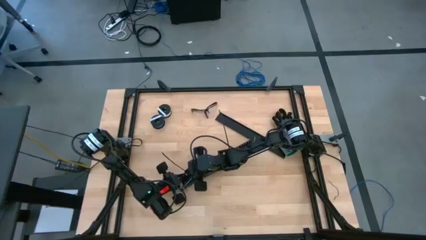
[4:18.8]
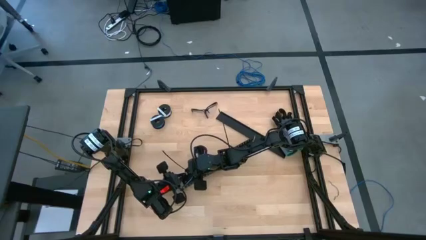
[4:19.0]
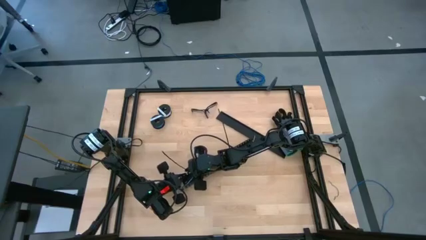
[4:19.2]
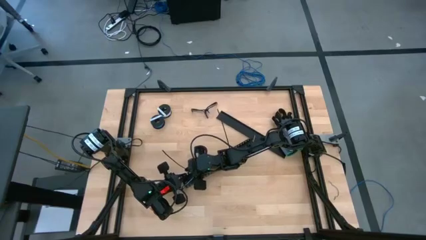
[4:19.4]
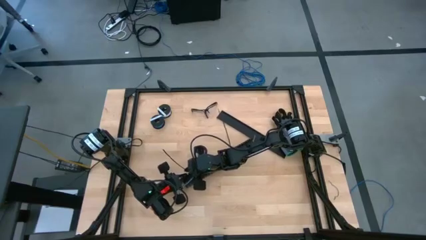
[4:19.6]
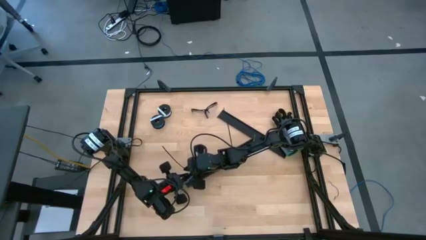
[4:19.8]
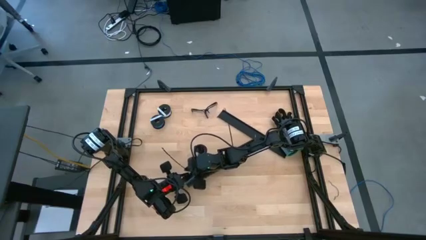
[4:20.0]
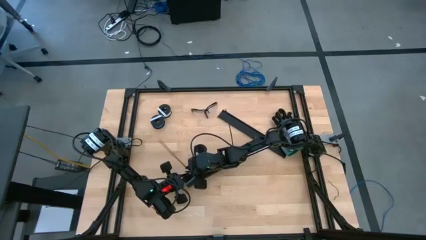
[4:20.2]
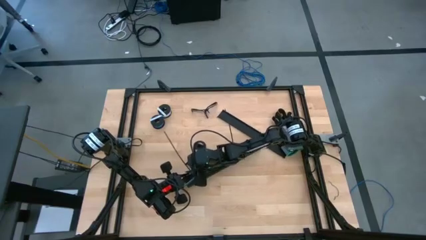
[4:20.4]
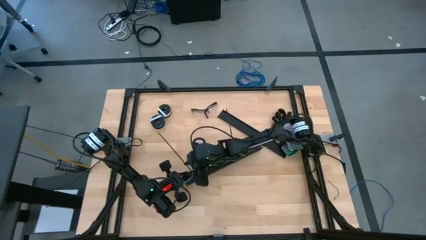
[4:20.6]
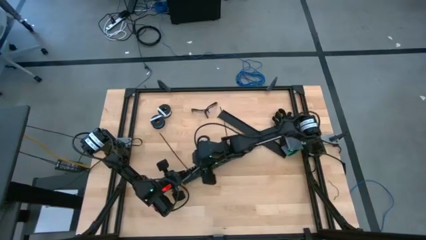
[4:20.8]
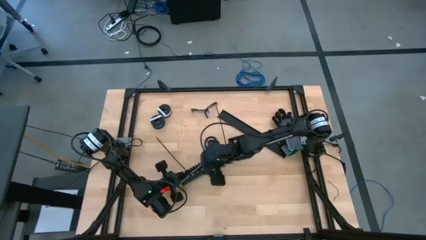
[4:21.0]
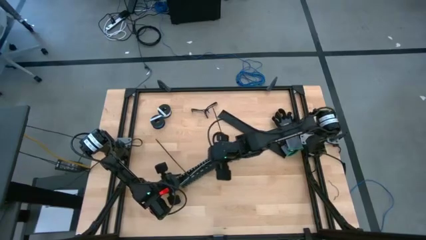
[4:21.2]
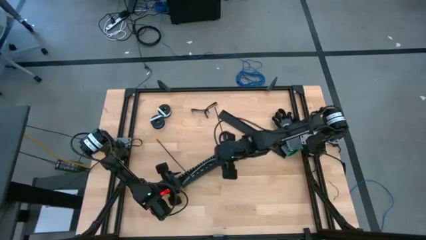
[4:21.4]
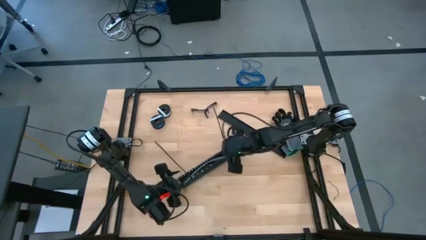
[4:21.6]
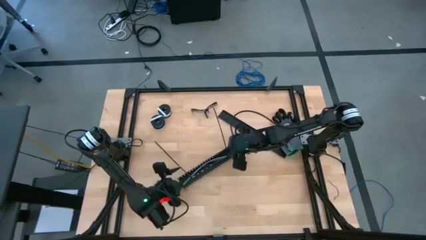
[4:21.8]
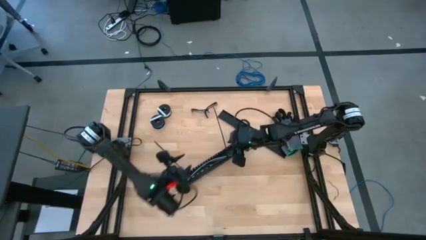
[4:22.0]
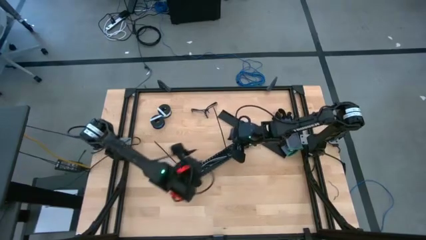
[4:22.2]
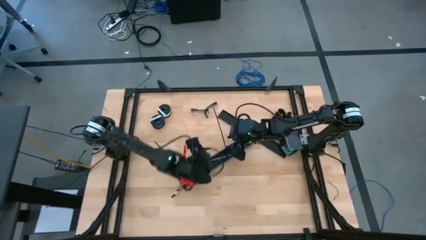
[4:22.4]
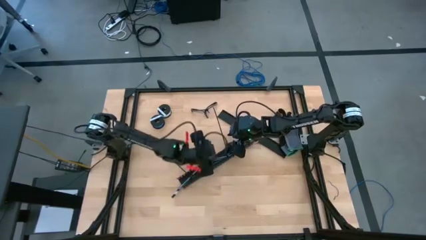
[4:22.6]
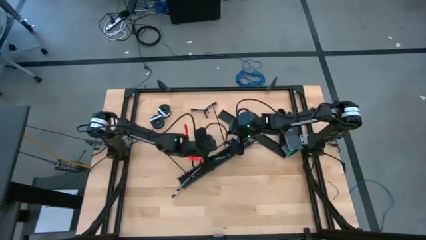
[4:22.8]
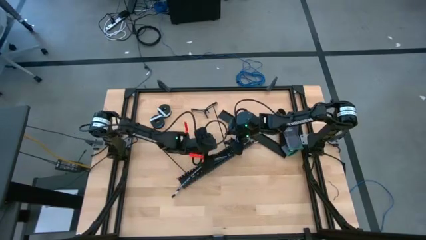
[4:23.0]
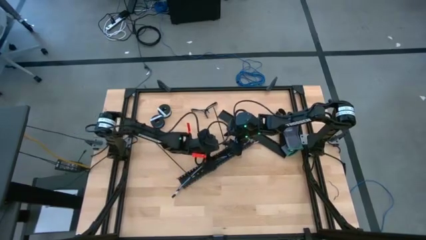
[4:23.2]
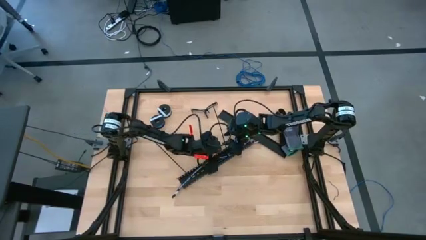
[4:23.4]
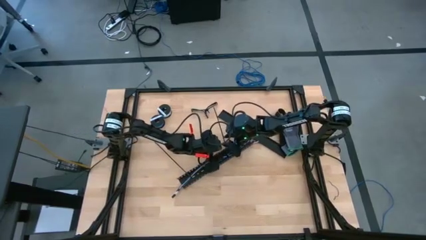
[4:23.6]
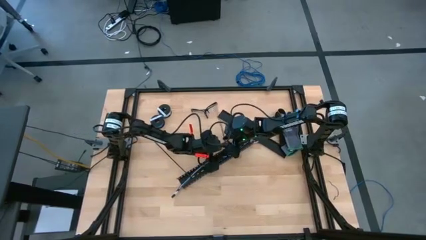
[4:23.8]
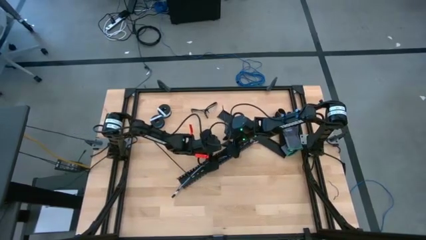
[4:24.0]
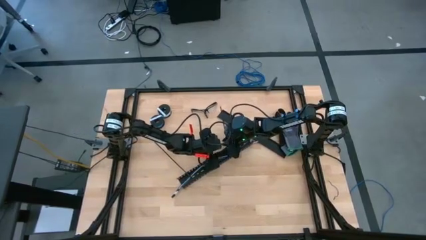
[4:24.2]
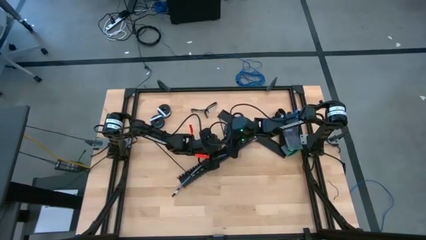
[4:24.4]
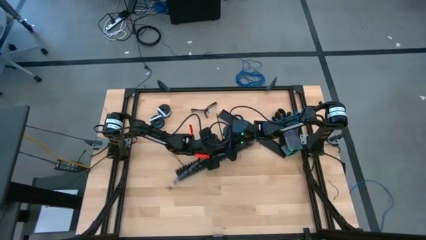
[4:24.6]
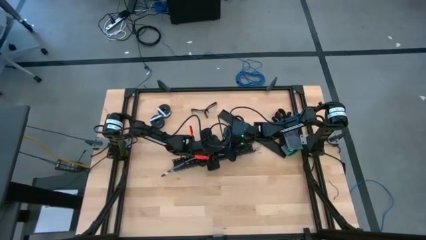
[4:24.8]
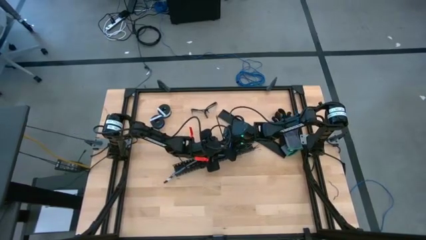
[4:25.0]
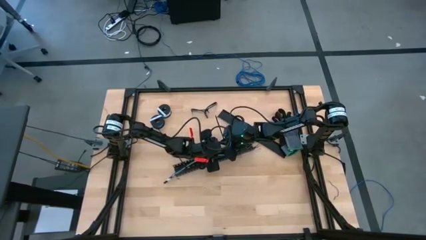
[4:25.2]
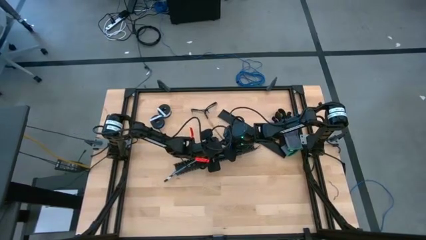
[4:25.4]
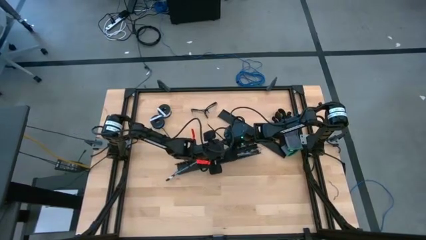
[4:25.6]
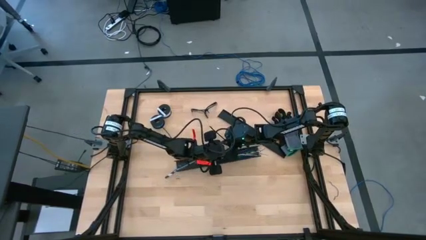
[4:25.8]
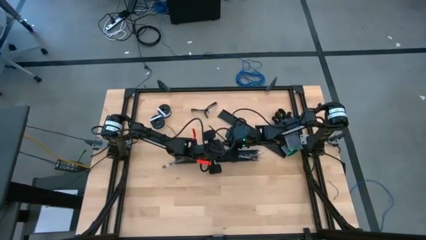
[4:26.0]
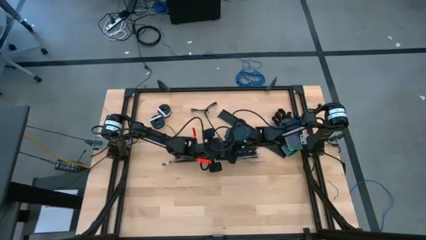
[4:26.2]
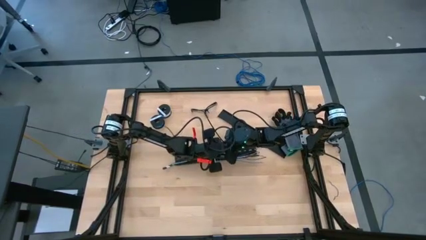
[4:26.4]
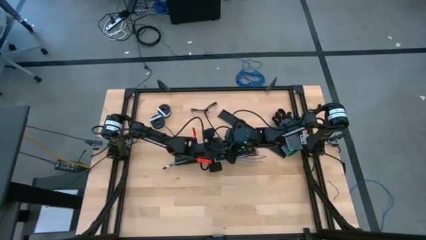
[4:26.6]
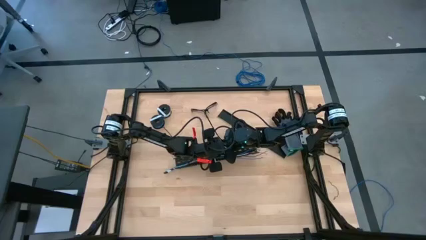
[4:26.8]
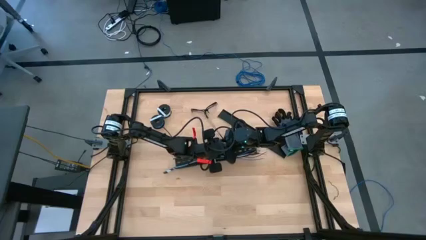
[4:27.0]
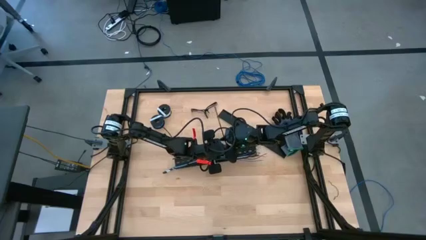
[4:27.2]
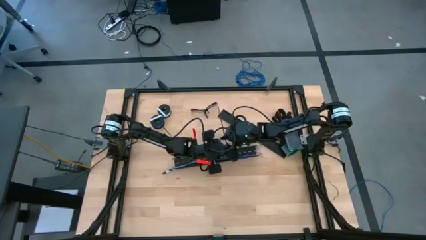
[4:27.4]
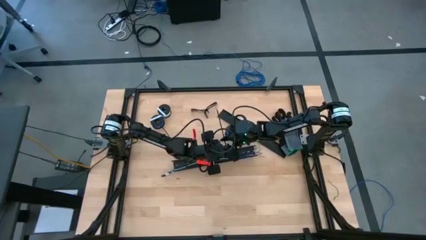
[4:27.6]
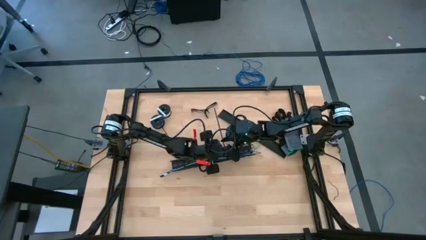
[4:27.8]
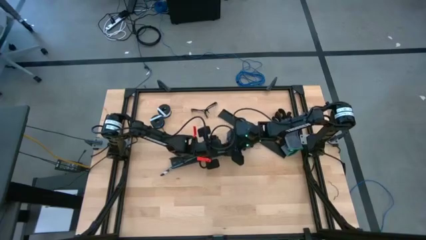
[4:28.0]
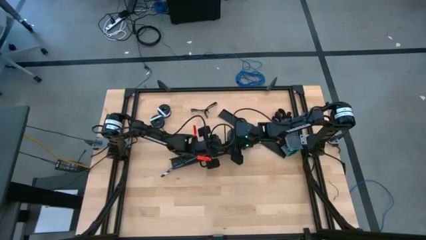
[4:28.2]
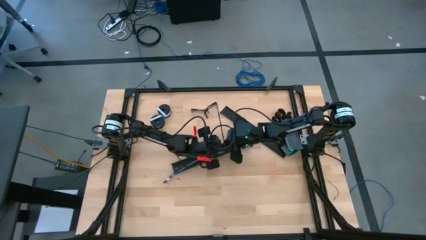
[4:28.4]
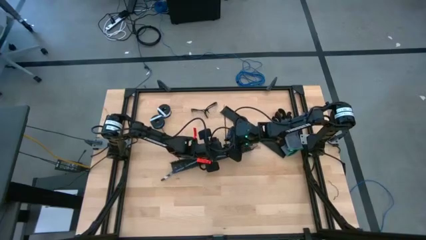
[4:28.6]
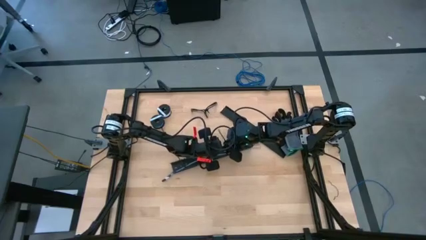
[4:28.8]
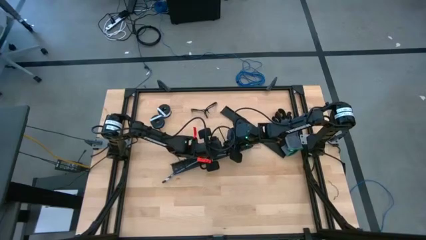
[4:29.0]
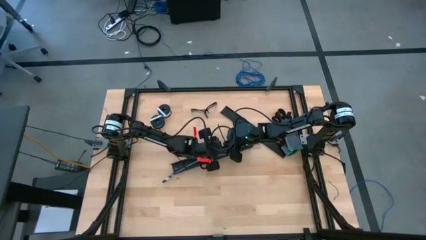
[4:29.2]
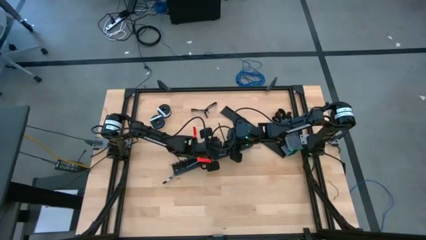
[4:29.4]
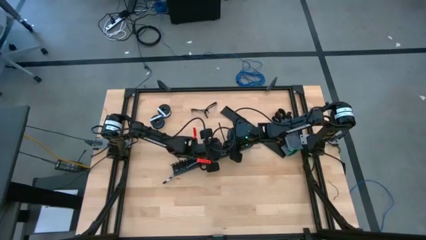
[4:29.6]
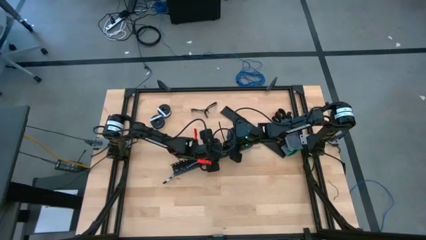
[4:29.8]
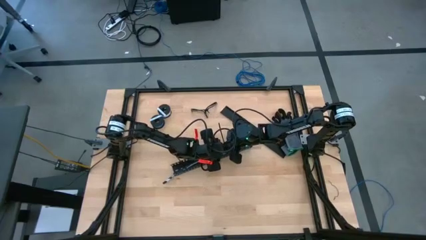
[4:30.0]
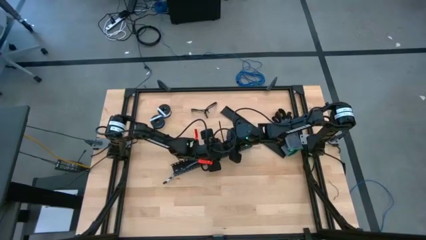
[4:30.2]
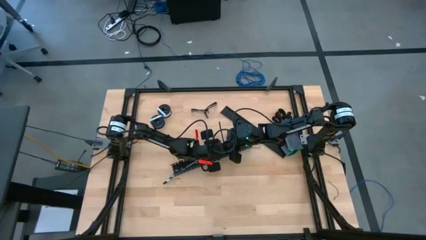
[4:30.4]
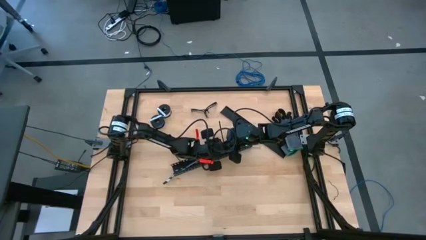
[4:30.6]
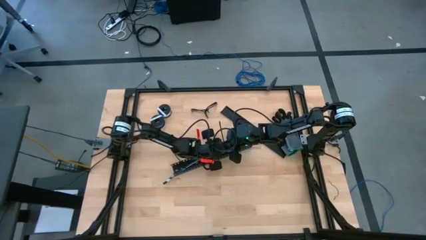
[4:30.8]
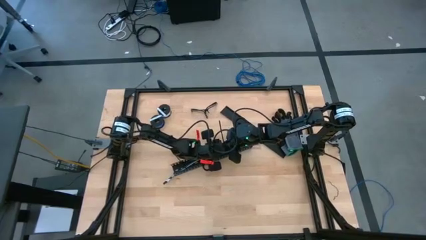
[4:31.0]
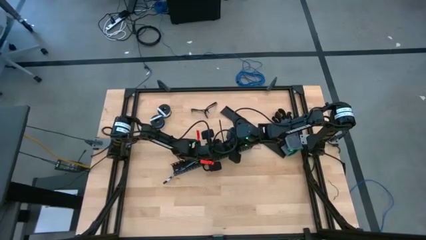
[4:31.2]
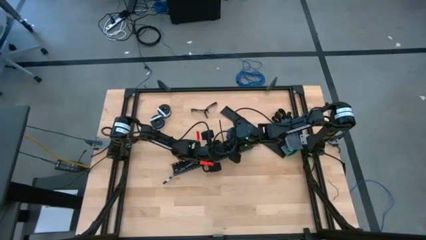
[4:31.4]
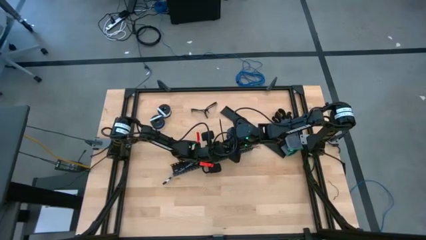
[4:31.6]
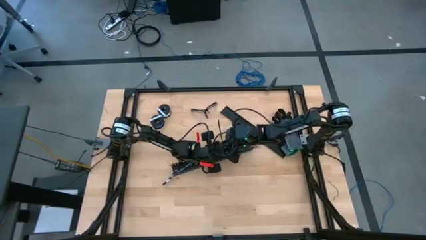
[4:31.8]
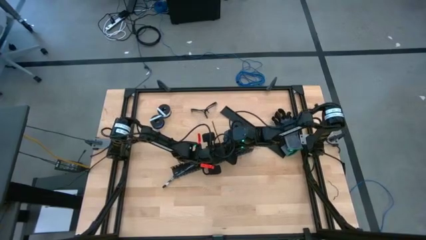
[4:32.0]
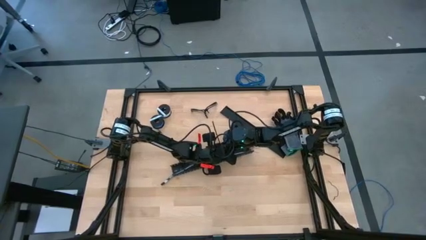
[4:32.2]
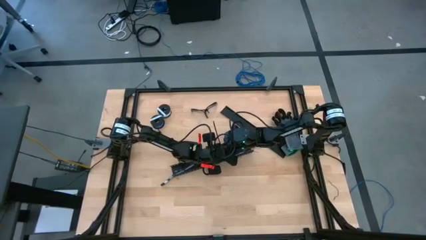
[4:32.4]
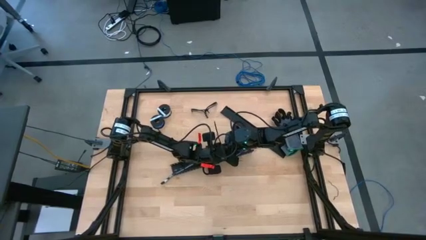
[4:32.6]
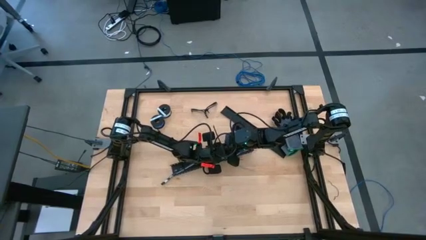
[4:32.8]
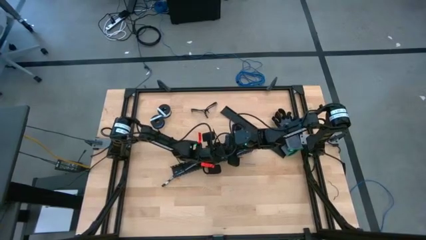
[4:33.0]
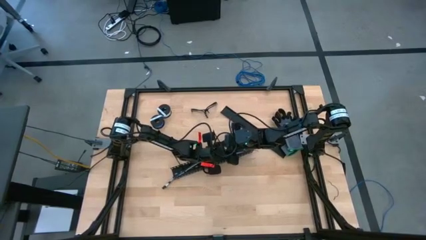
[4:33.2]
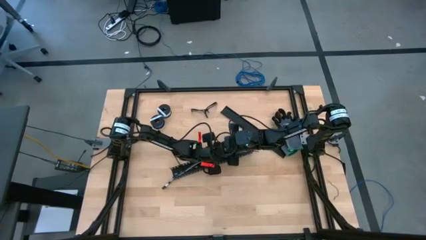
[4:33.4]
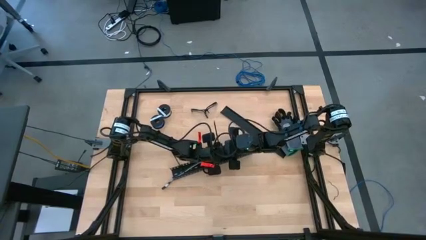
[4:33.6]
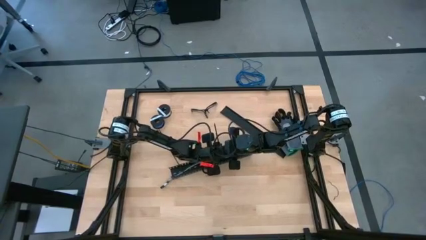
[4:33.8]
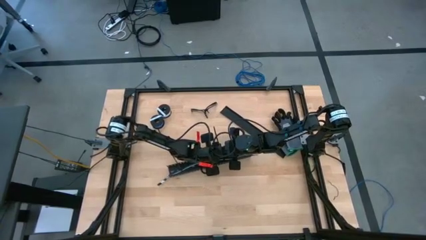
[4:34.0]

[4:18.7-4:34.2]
Task: Ziptie cables
Put the wrapped cables into the black cable duct
